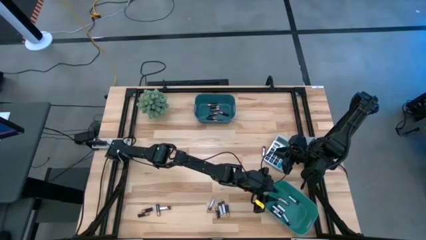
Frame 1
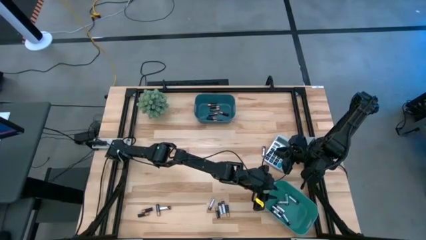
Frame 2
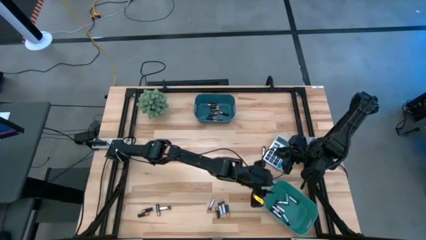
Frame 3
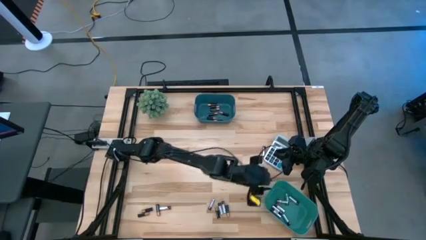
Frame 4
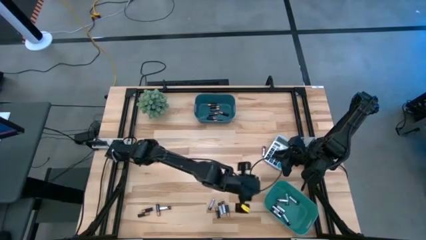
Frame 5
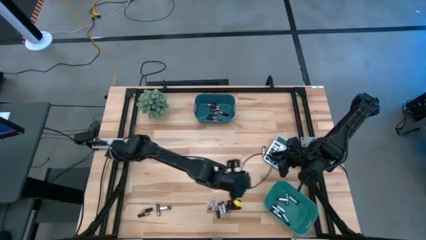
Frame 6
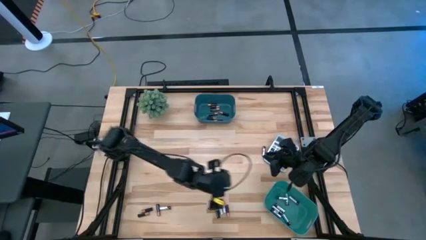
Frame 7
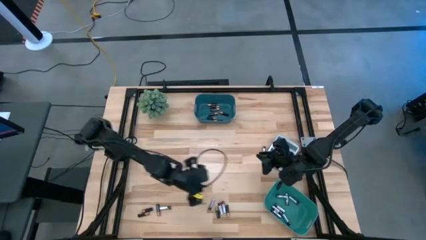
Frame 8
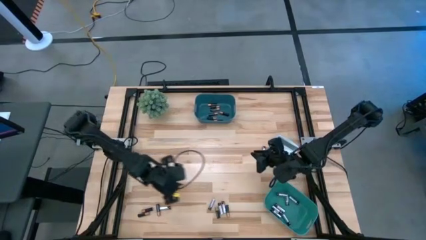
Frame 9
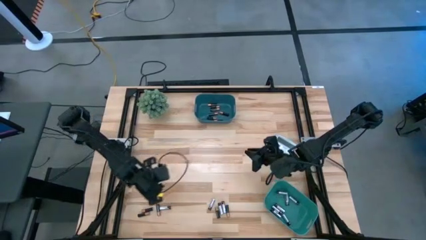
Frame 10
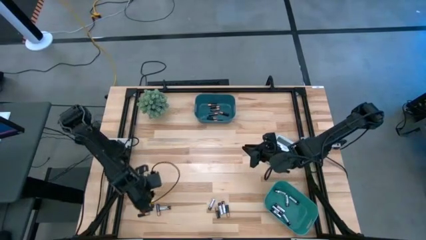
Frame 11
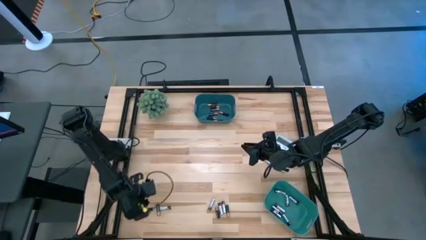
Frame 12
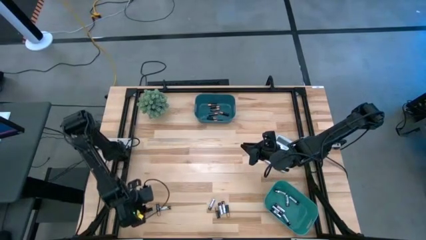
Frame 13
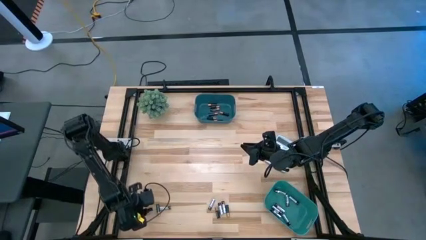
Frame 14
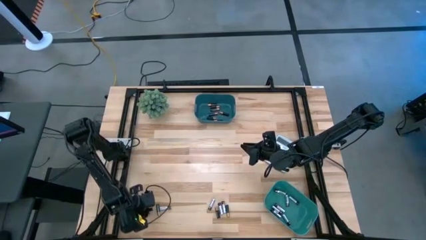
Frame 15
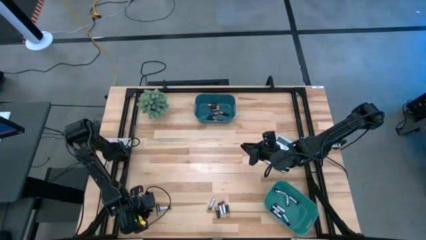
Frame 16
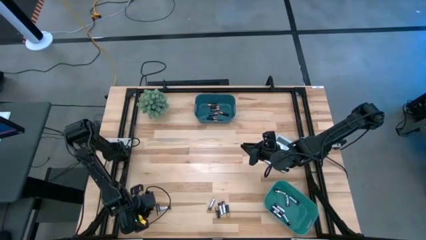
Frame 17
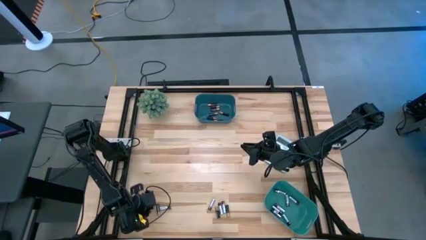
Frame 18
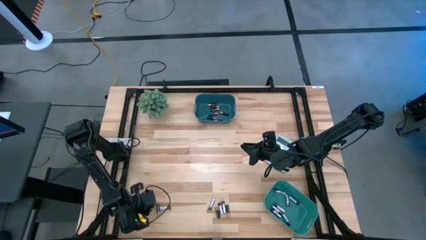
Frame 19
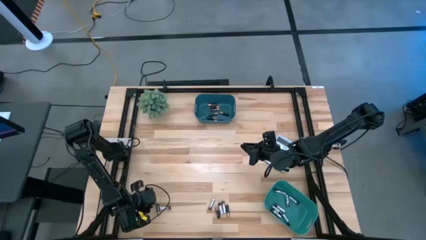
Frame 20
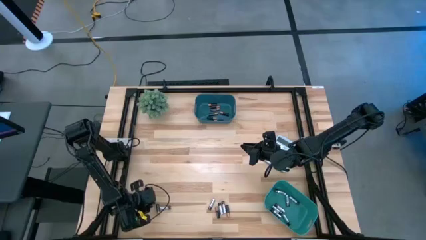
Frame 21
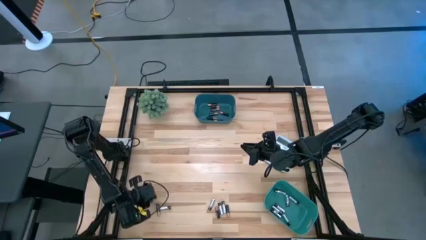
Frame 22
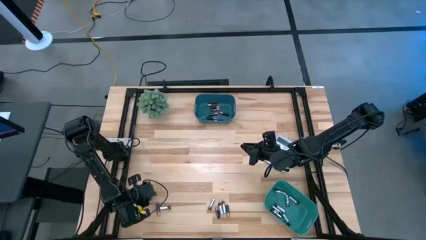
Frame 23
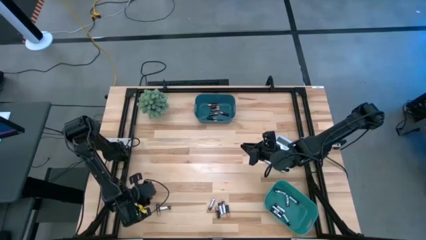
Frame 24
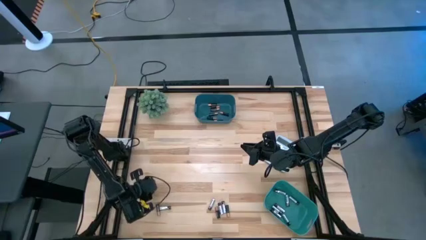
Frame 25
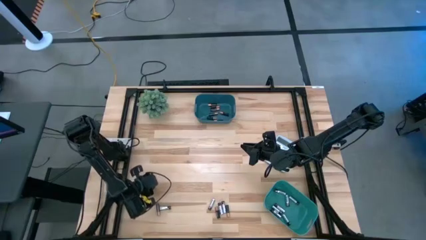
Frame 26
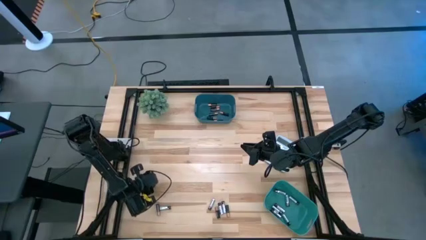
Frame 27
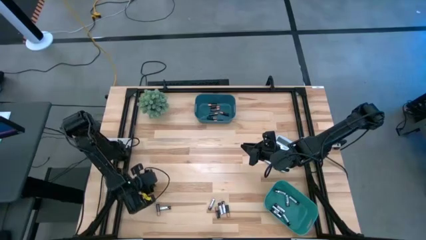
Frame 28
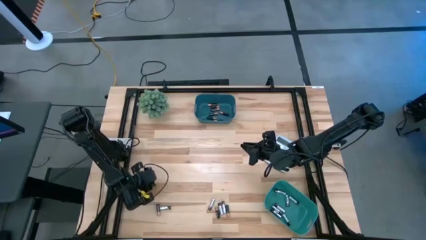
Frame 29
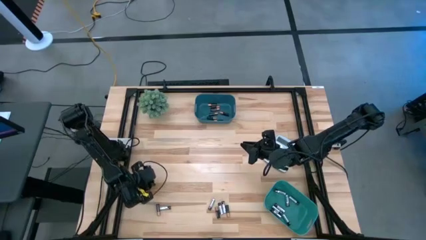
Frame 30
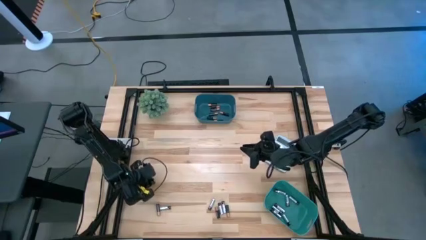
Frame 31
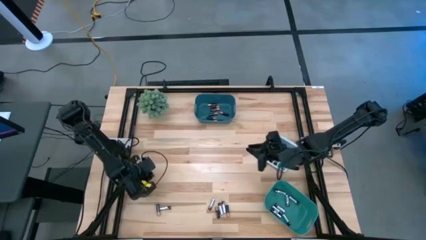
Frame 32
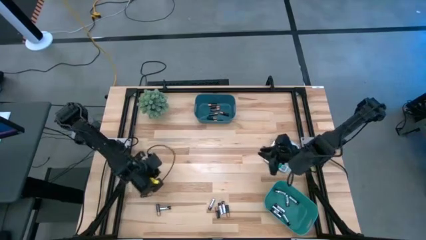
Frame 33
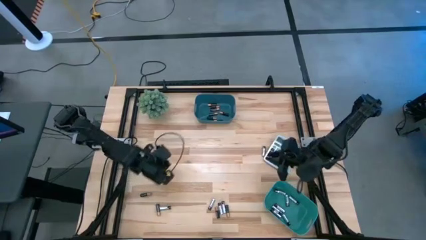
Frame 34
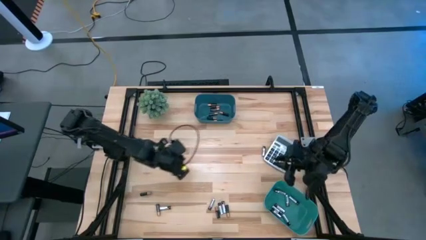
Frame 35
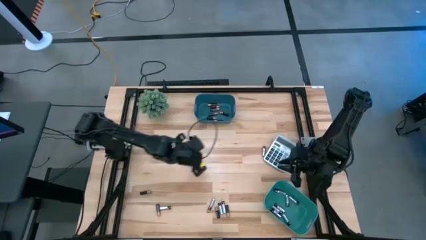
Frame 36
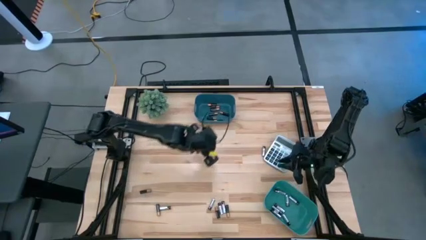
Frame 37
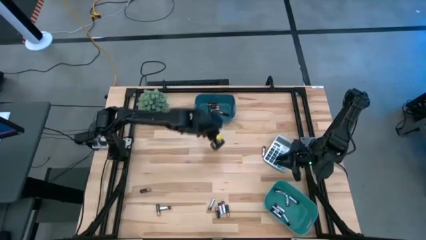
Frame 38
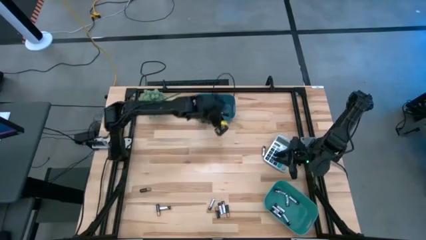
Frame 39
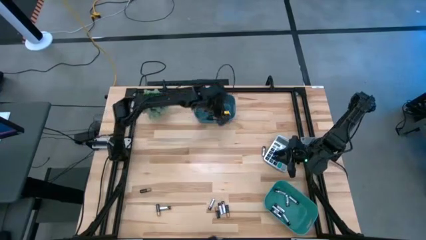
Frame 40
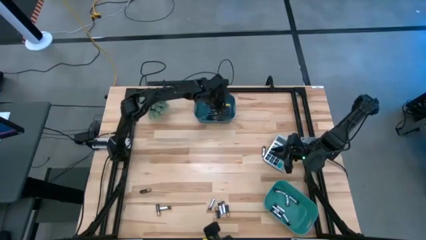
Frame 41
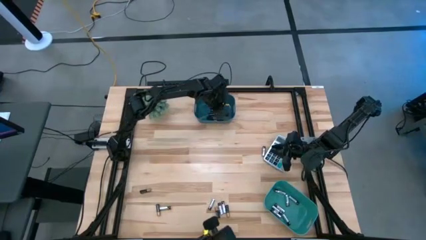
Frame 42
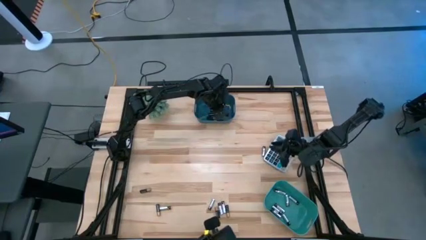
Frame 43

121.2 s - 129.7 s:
Task: Sort batteries
Put the black battery into the blue bin

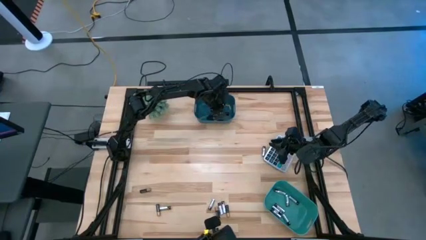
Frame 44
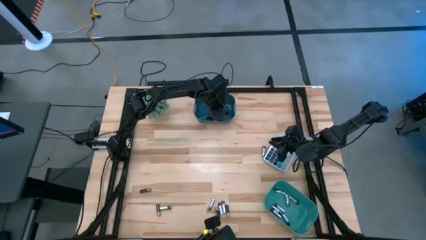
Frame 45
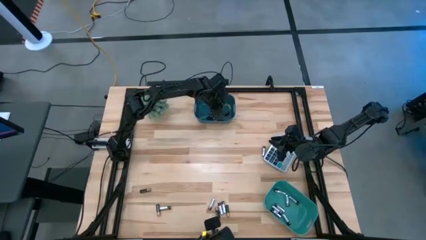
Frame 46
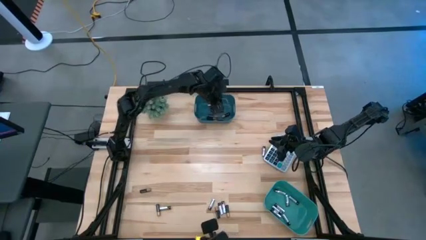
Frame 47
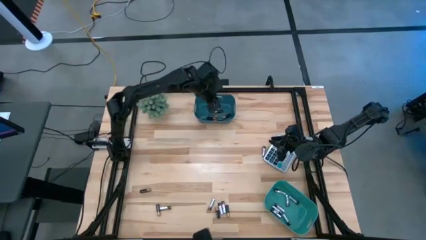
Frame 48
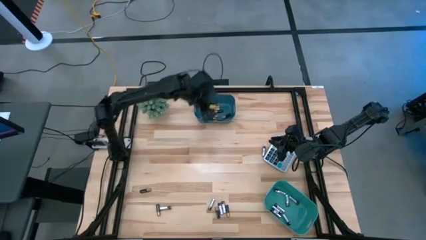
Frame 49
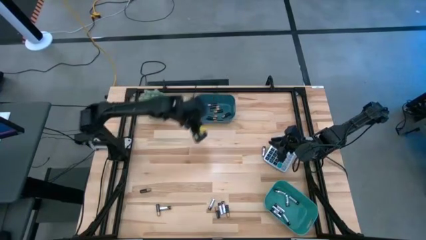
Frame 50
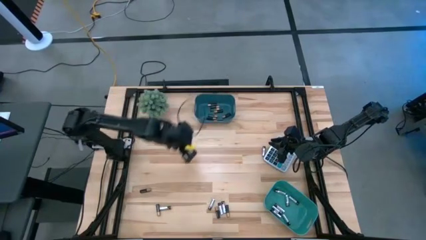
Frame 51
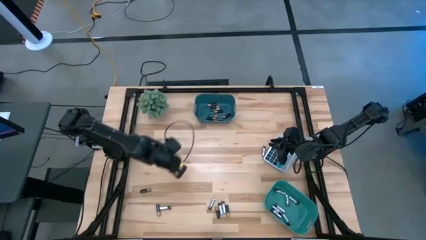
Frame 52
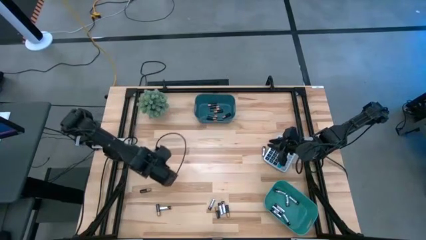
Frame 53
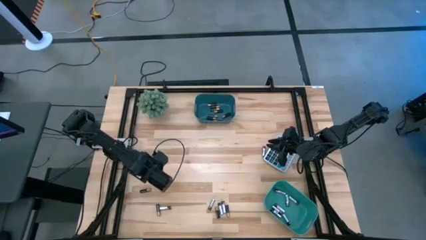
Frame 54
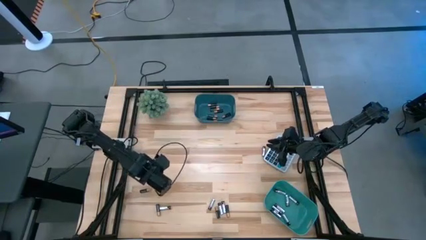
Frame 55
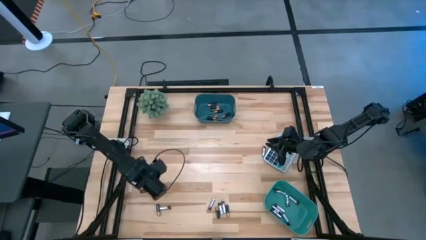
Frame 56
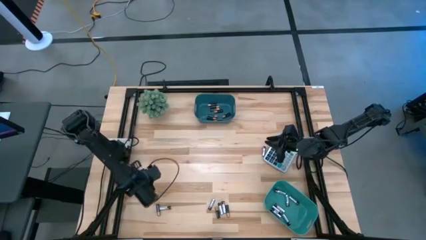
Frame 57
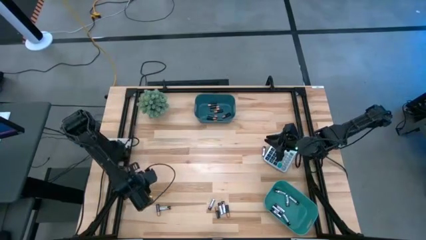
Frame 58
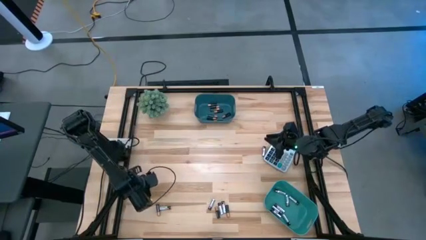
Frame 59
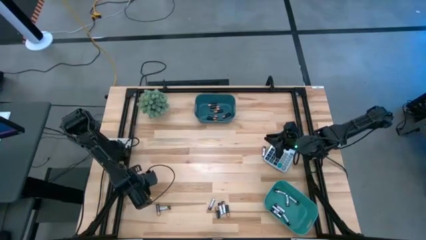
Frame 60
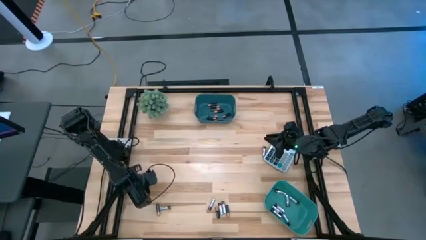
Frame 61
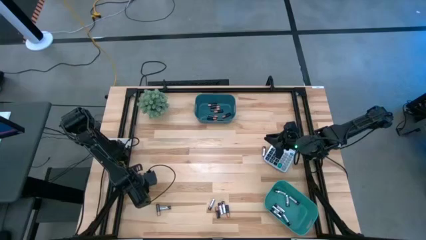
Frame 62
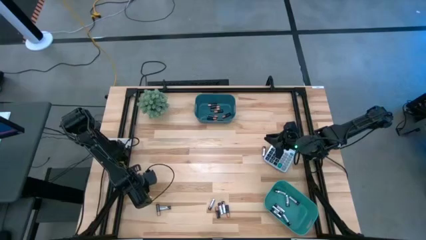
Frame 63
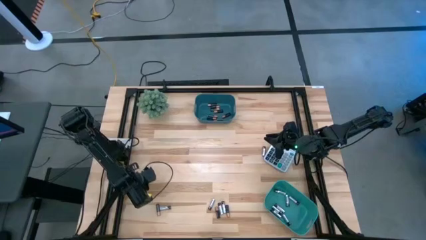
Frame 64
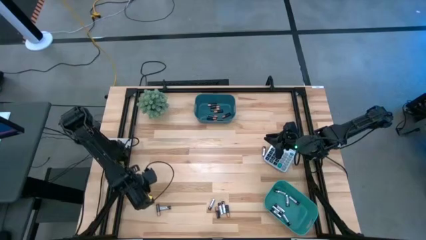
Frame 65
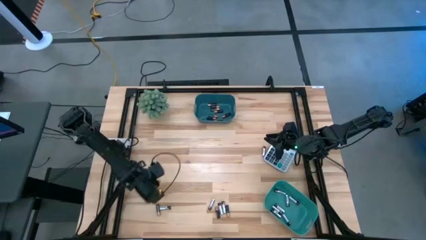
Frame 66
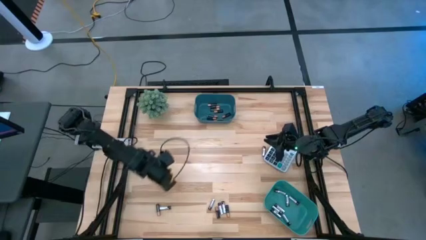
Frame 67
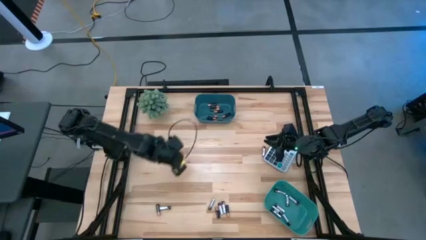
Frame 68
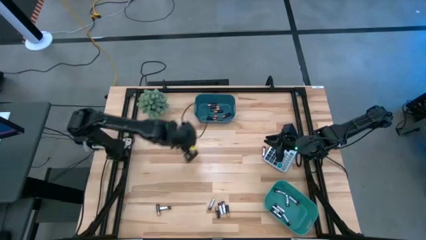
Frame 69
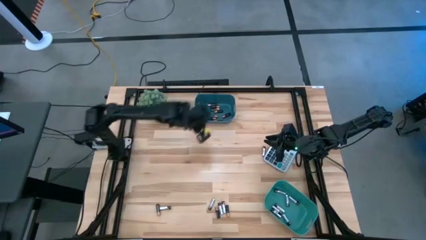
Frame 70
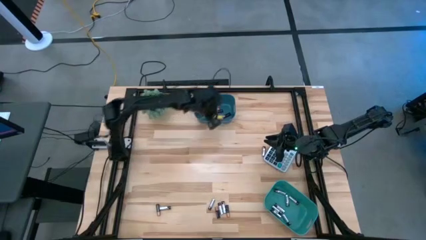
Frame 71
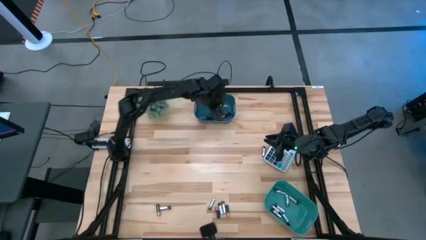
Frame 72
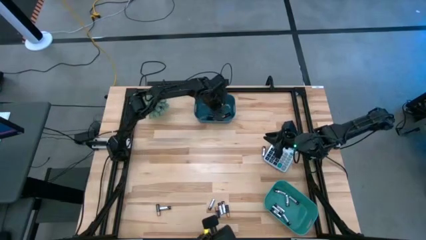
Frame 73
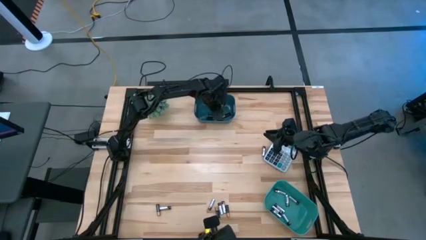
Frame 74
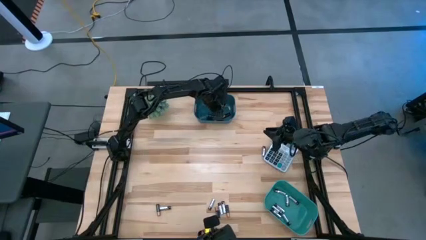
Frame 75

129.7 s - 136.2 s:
Put the black battery into the blue bin

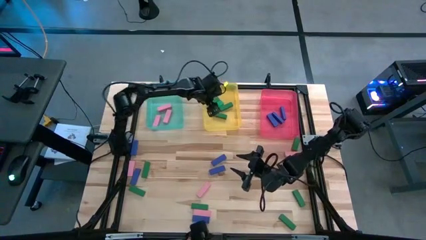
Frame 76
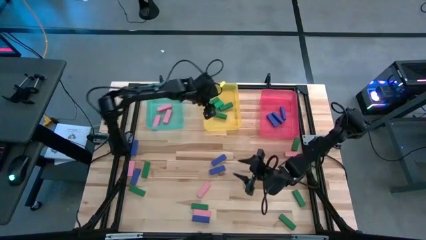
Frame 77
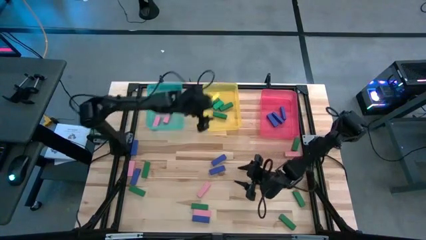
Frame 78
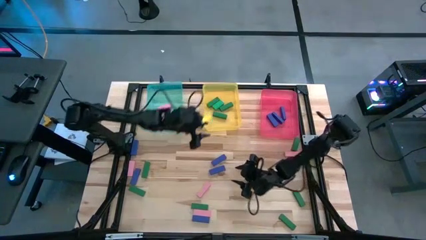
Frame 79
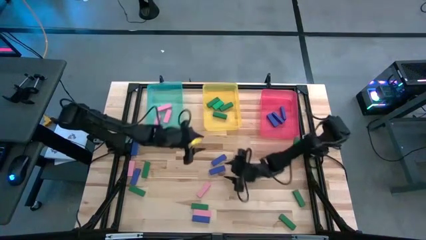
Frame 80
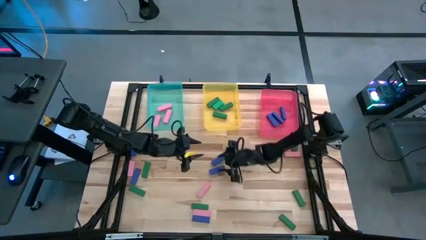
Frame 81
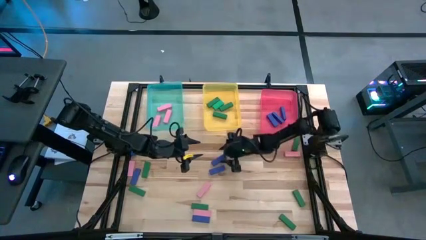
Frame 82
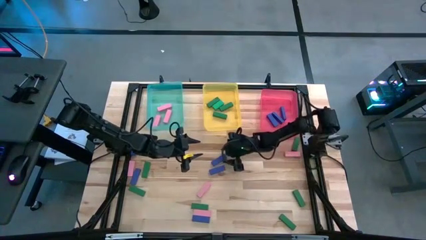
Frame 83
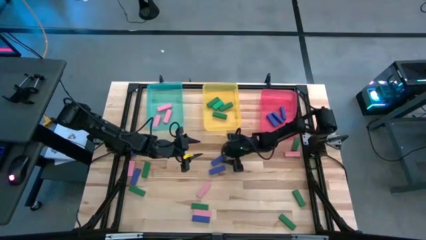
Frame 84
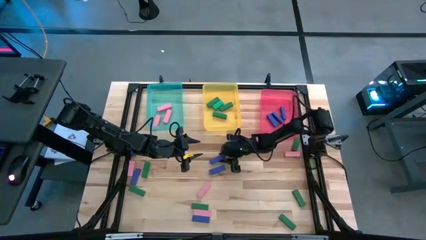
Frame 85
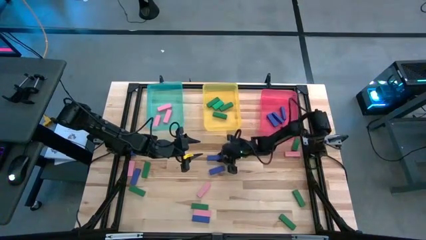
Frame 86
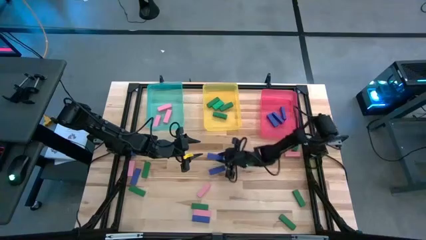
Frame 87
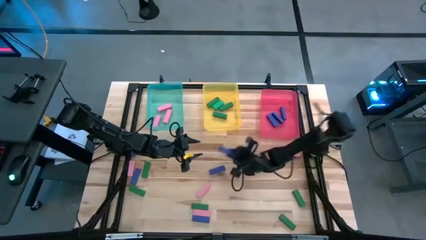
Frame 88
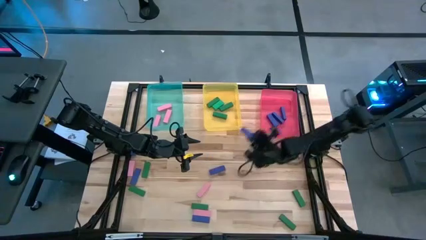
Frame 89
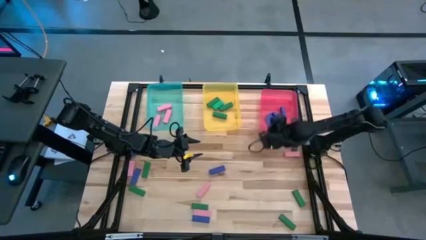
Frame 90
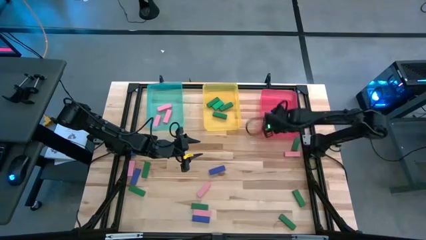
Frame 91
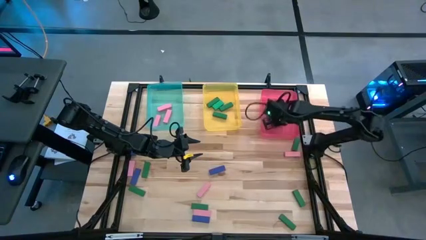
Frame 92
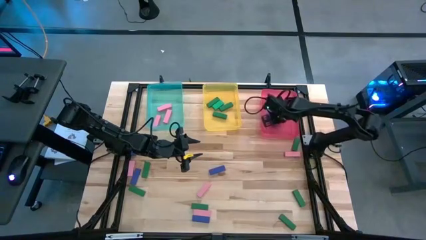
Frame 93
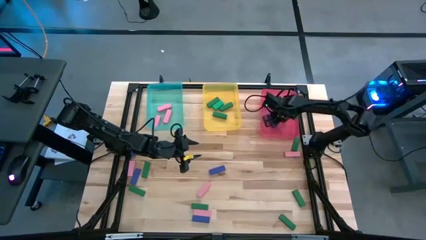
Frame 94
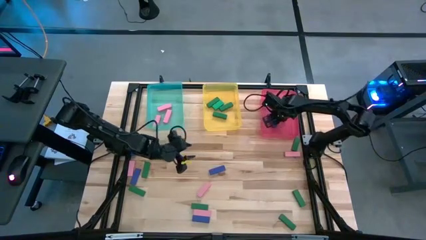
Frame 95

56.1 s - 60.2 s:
Task: Sort blocks
Put the blue wooden block into the red bin
